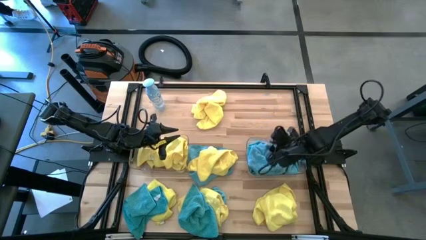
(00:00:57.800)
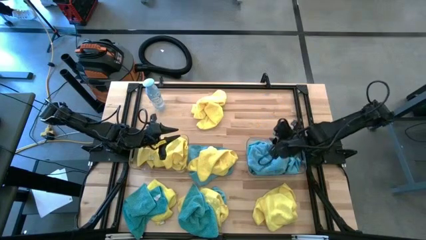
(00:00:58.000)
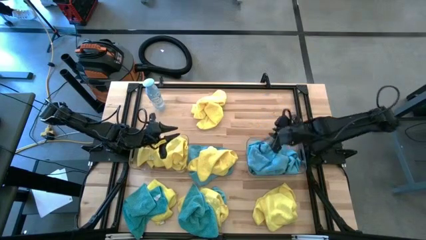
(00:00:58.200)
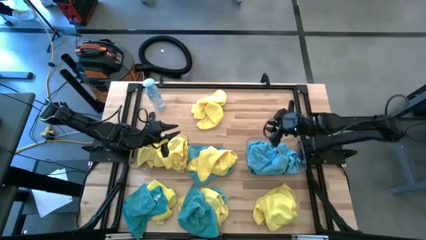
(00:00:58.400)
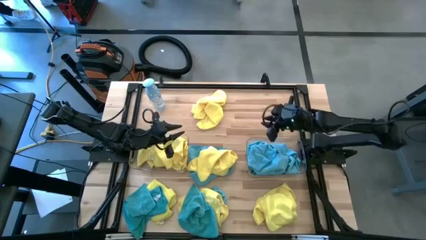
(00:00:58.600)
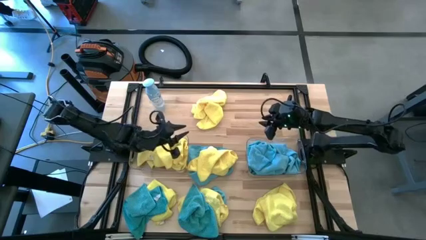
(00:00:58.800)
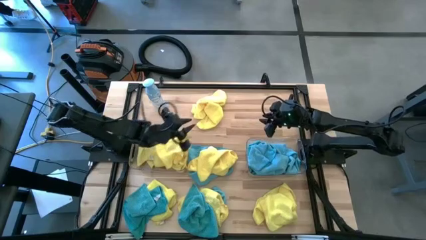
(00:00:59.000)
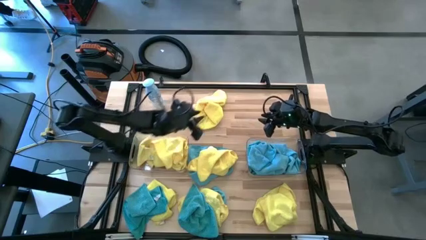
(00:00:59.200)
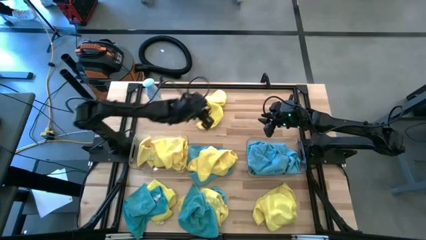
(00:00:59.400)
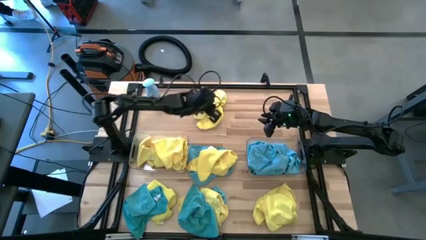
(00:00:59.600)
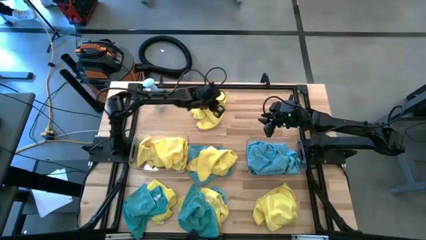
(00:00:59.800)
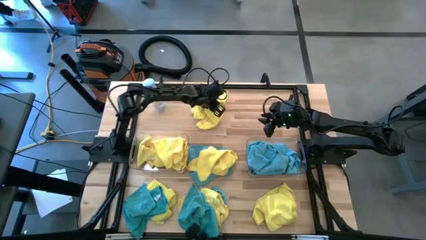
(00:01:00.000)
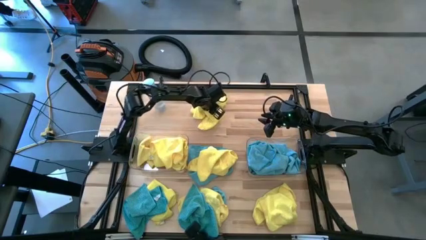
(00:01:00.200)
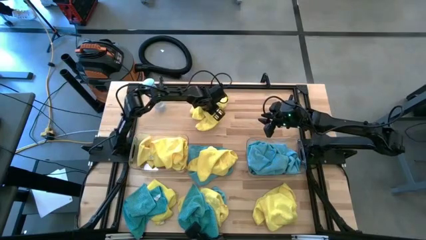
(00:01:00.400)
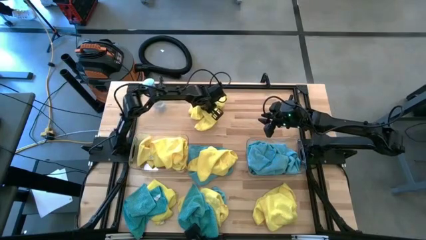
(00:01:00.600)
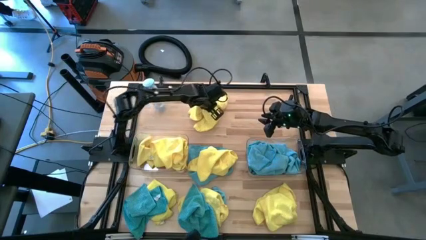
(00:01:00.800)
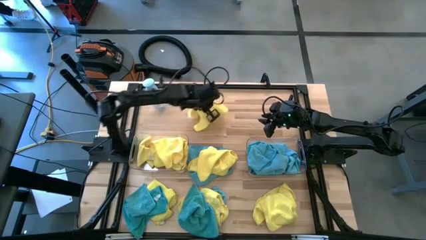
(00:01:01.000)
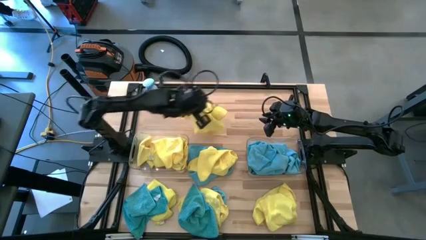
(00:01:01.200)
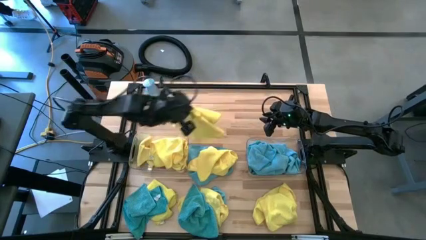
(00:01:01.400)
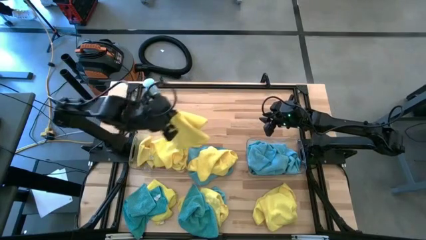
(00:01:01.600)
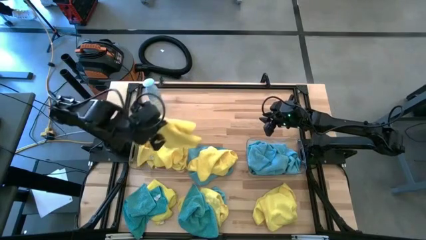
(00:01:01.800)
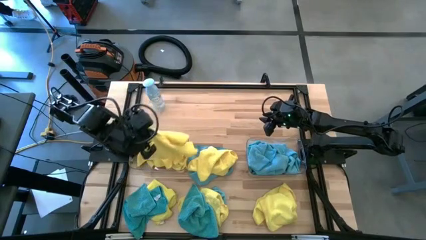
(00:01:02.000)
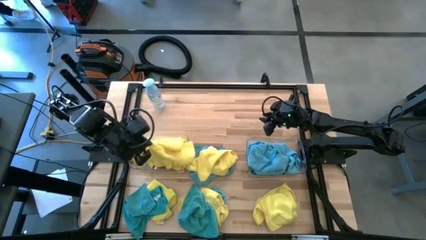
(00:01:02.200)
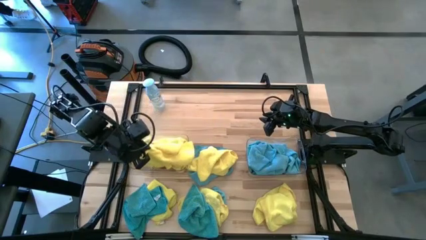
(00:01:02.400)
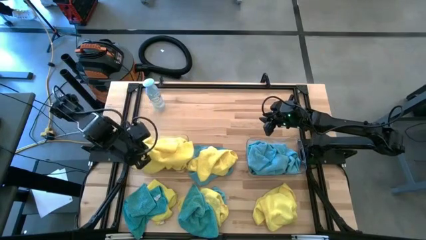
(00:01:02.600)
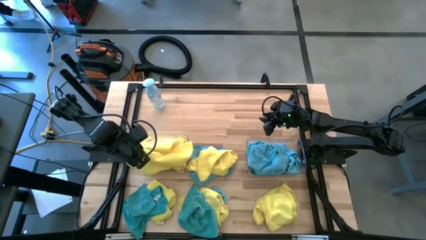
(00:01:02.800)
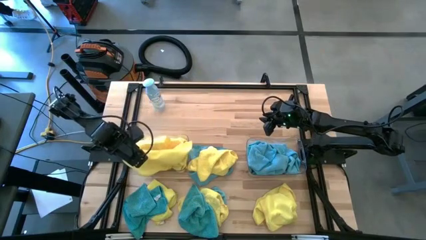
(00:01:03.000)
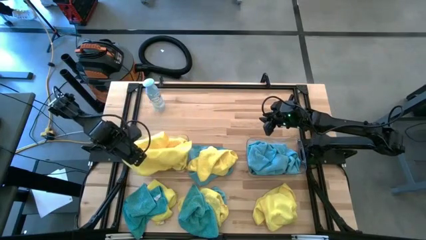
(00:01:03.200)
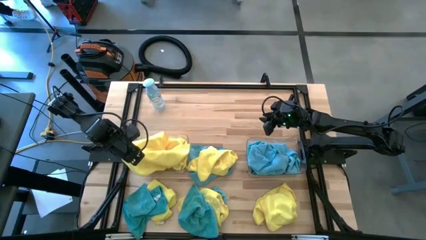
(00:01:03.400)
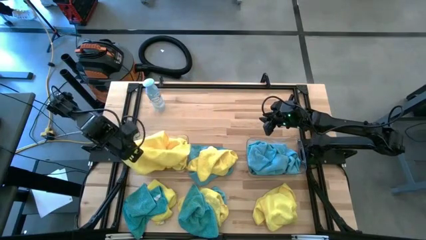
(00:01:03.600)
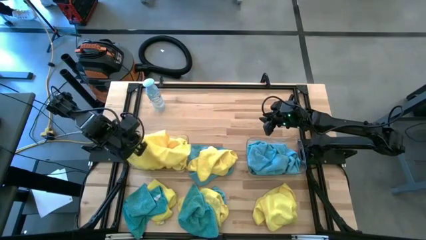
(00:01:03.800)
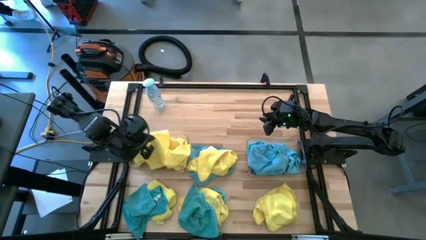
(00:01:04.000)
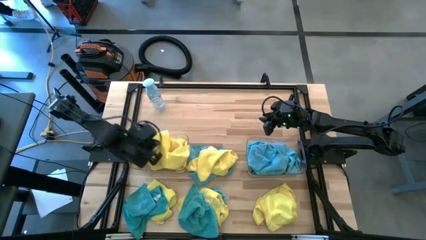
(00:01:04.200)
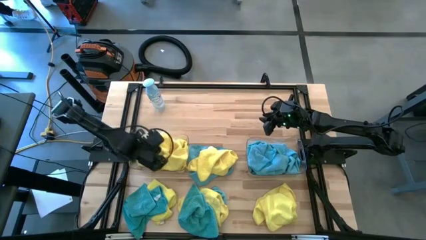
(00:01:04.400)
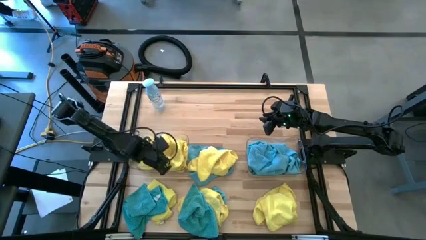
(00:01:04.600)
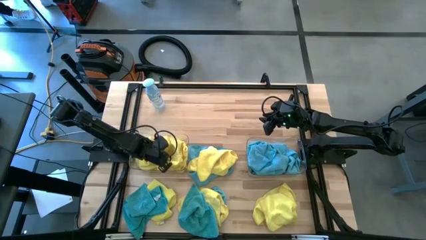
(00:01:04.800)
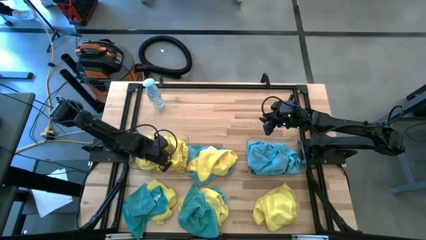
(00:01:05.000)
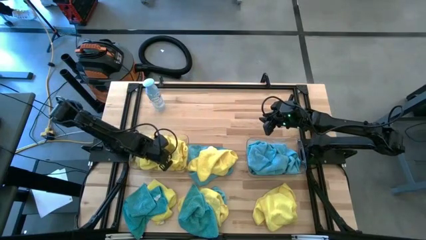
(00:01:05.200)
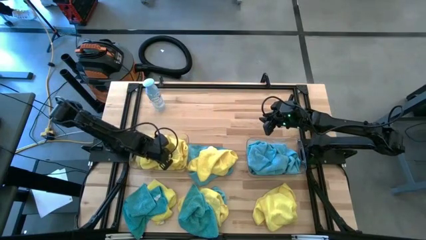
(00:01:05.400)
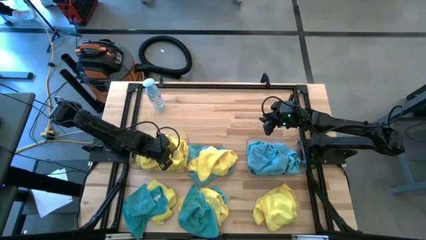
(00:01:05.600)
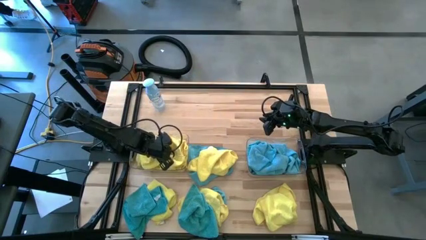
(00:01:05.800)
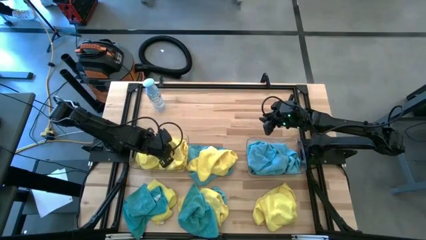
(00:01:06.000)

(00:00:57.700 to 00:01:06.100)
Task: Sort microfiber towel by color & place in baskets
Put the yellow microfiber cloth into the left transparent bin

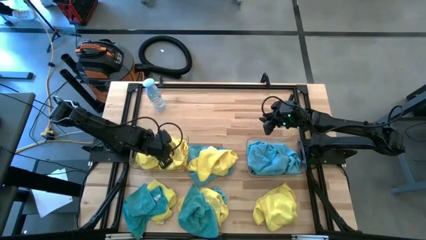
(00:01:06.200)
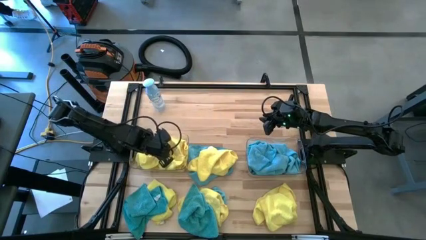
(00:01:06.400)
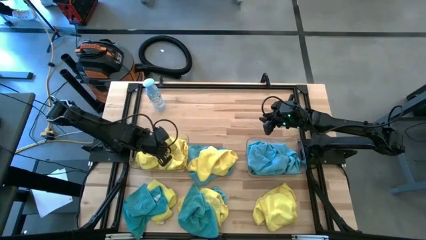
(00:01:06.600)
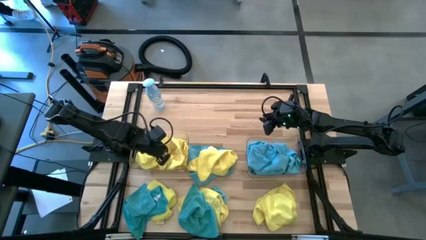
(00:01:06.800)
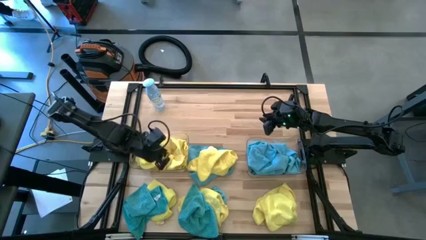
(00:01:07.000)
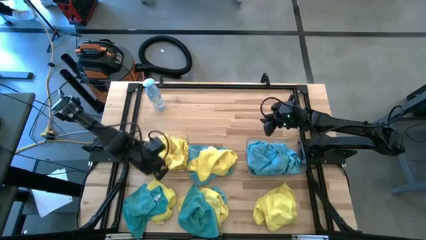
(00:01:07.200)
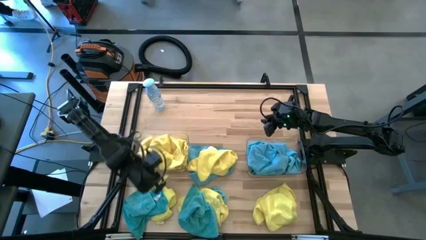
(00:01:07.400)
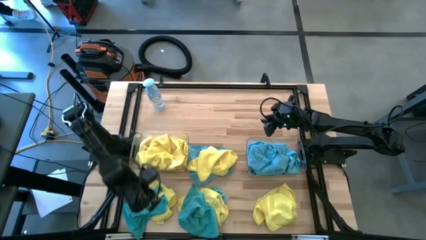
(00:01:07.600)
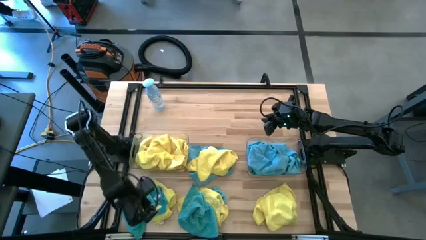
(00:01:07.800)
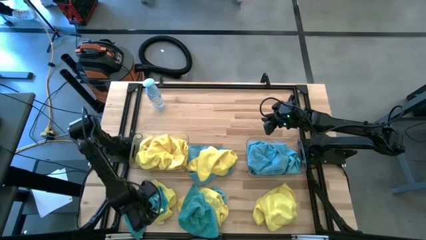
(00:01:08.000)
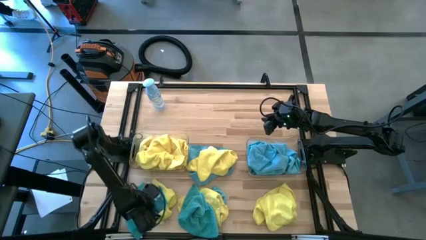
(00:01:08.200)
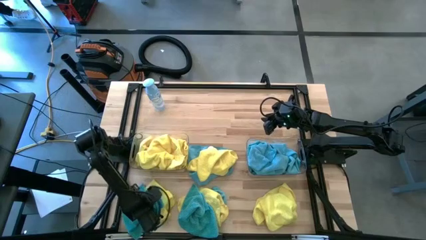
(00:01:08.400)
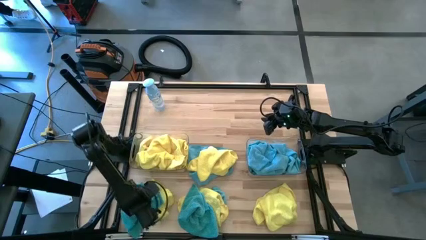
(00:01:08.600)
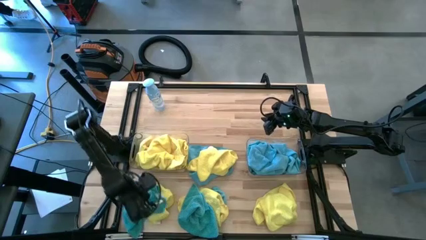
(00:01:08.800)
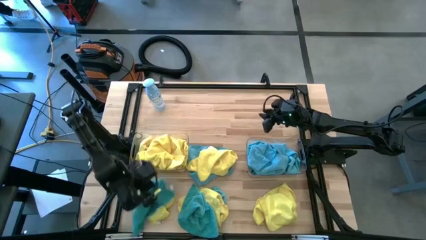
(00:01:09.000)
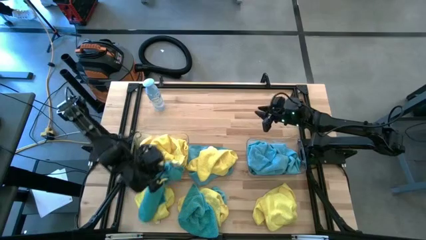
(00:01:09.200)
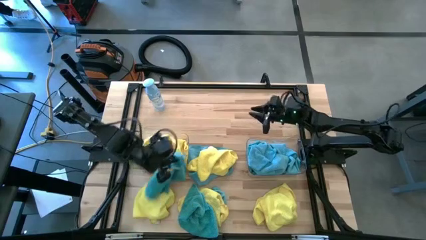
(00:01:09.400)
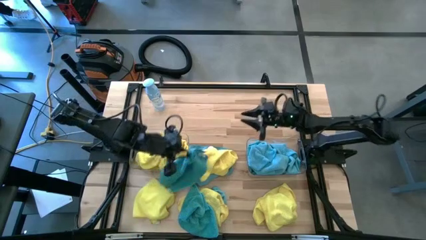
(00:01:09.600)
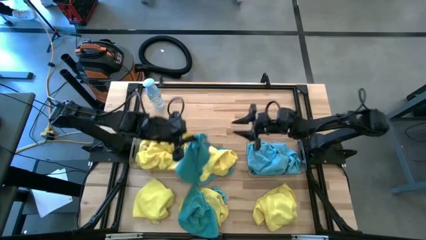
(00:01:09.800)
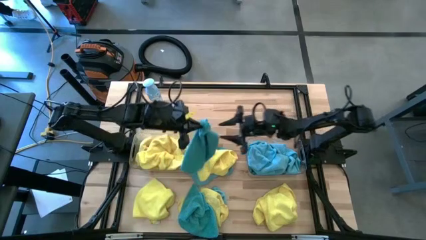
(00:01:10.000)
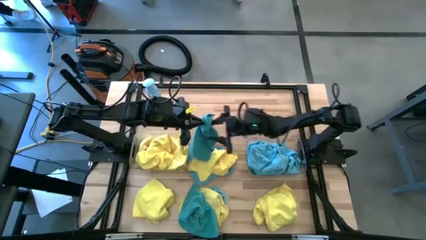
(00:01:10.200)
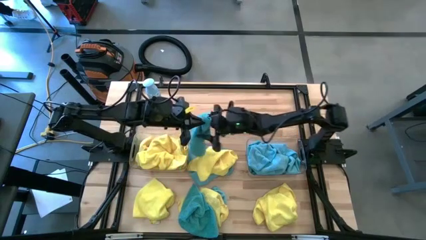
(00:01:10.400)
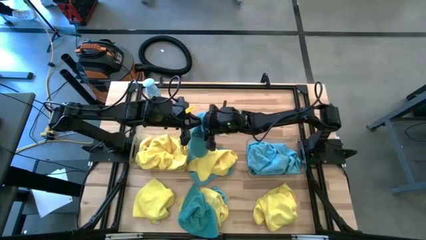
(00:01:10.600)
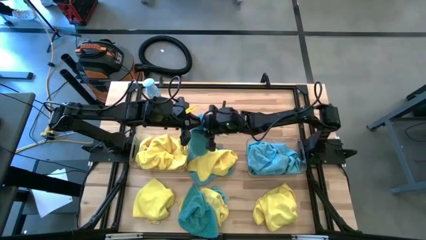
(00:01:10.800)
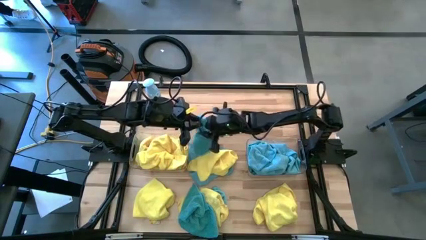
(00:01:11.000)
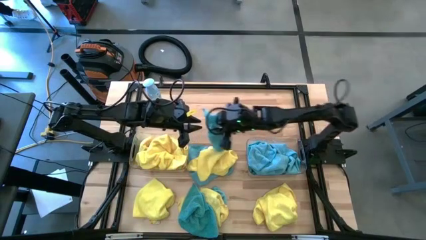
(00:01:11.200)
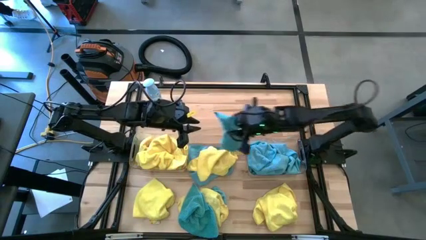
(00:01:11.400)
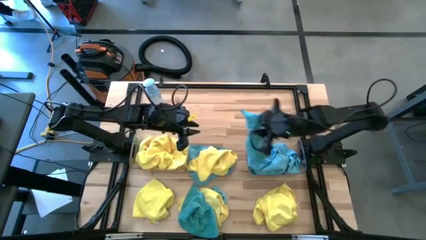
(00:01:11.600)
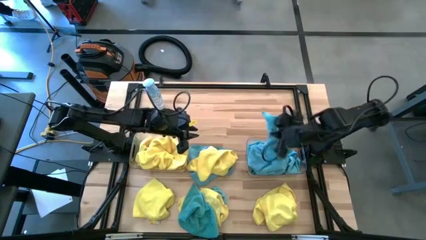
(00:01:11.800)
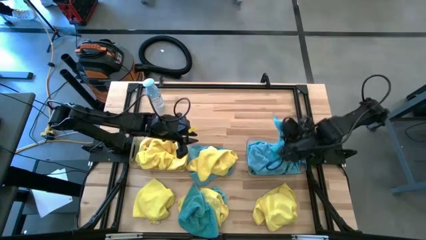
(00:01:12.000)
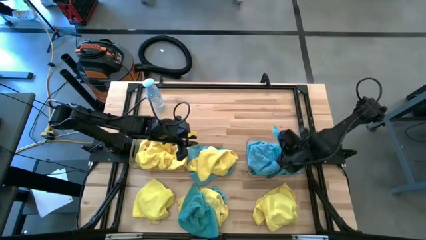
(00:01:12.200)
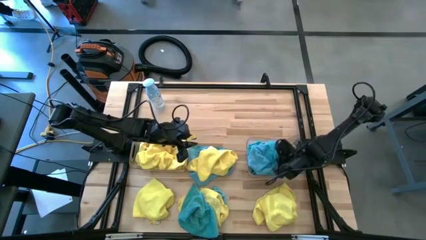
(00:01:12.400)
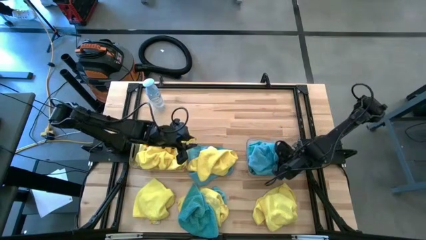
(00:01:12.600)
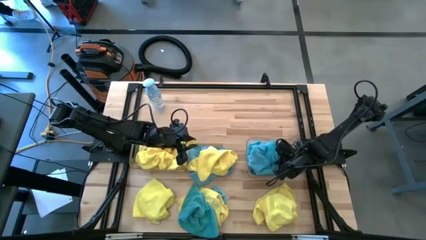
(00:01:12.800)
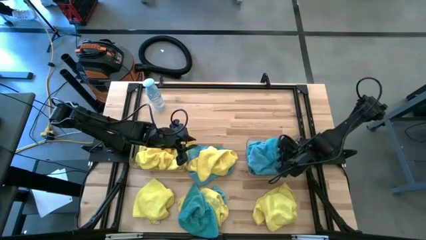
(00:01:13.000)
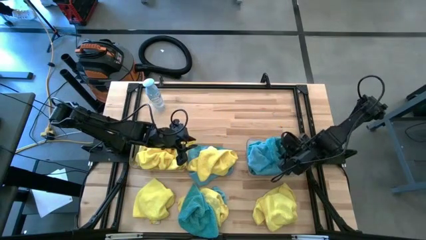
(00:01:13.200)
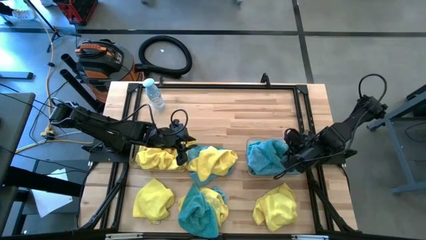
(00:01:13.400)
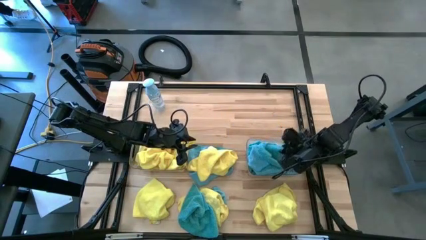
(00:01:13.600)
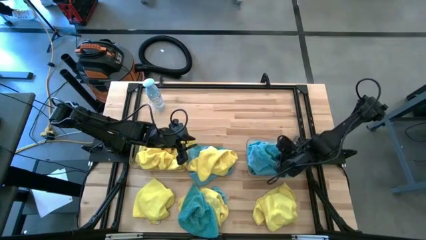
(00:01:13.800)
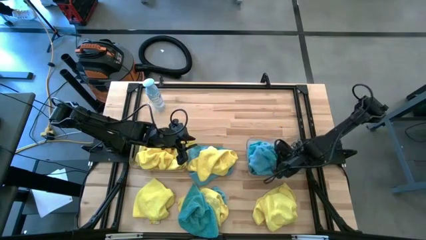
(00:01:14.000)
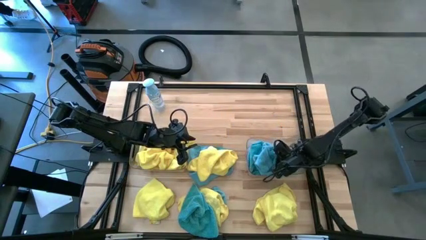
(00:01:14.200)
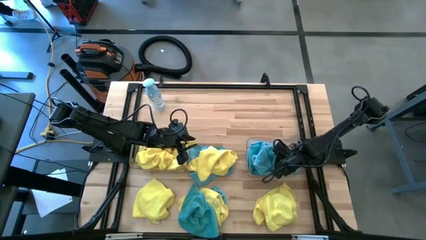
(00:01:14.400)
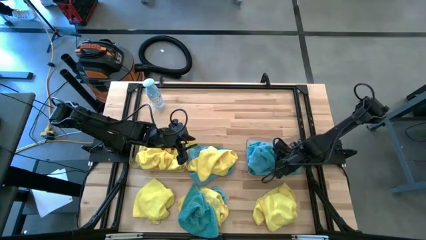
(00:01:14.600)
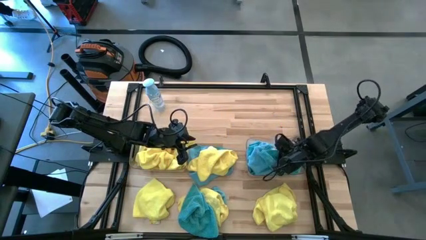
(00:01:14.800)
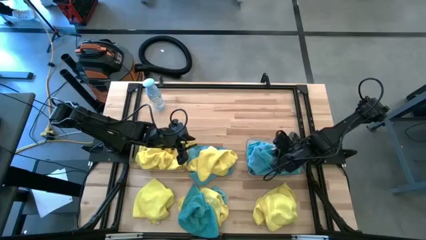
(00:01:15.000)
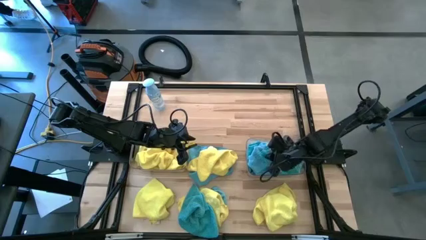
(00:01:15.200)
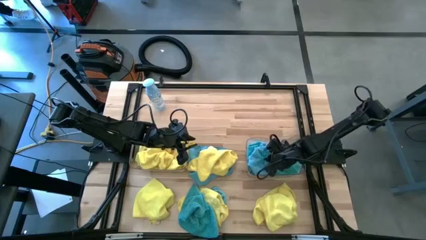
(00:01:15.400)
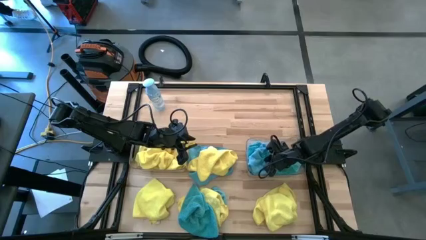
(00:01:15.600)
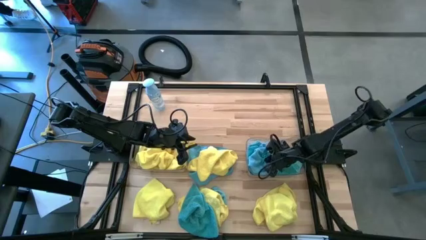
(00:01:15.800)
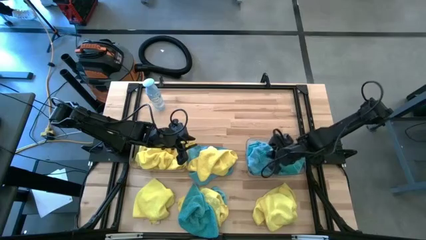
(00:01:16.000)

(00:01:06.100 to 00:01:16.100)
Put the blue microfiber cloth into the right transparent bin
